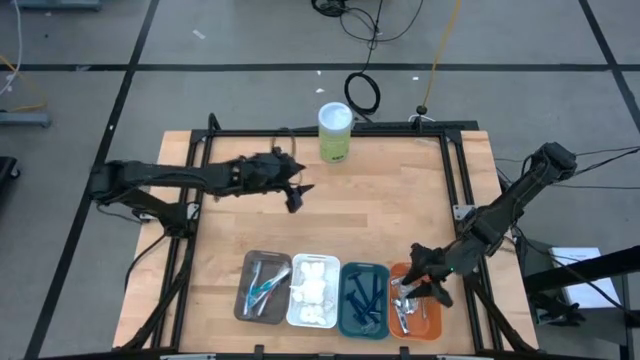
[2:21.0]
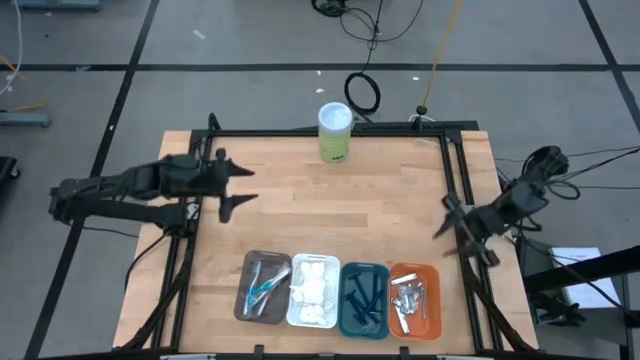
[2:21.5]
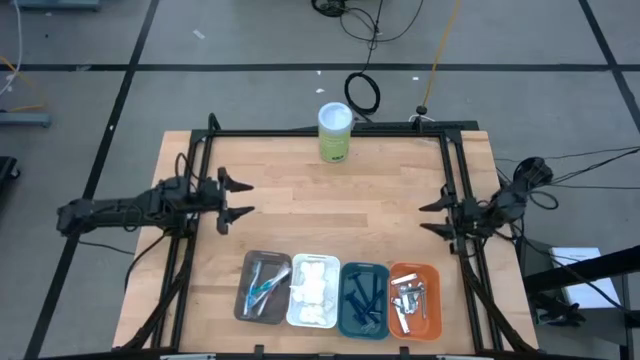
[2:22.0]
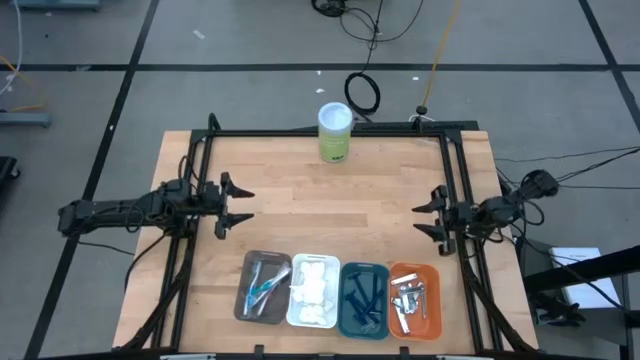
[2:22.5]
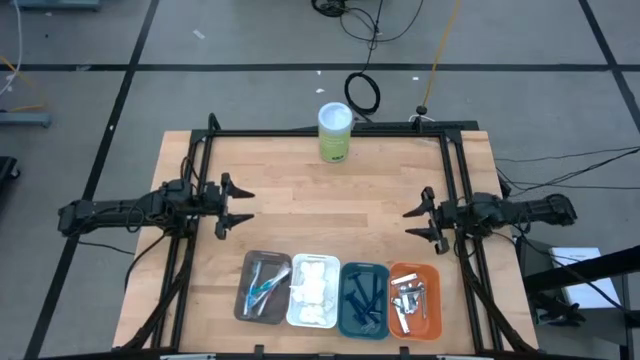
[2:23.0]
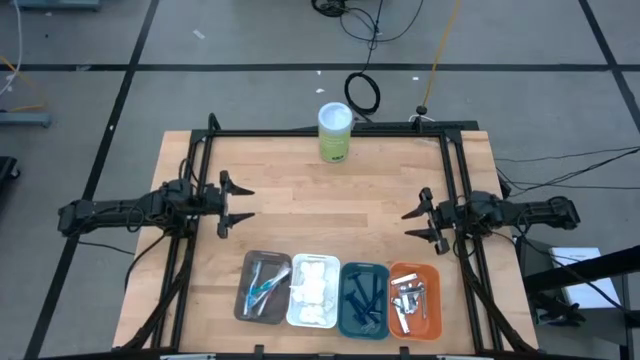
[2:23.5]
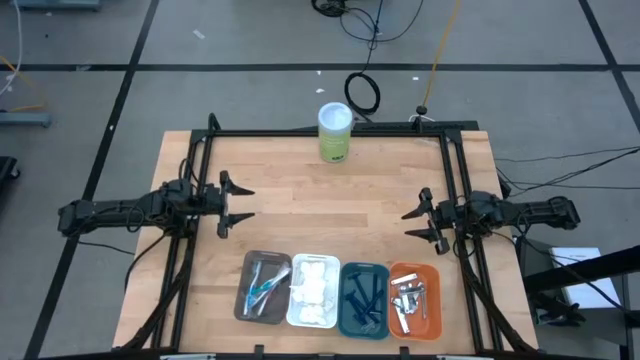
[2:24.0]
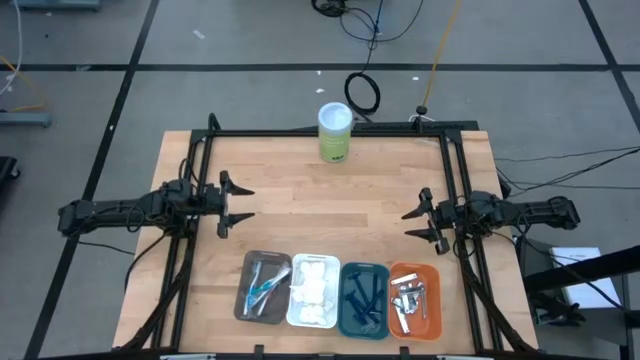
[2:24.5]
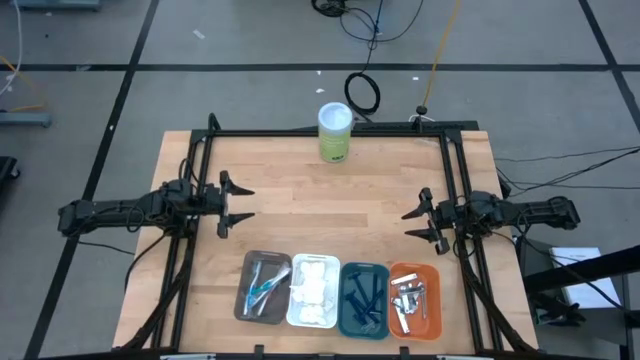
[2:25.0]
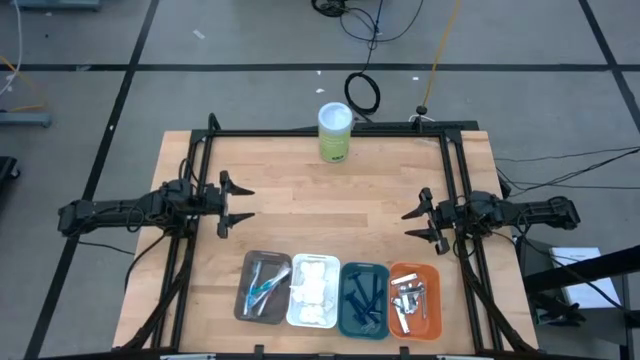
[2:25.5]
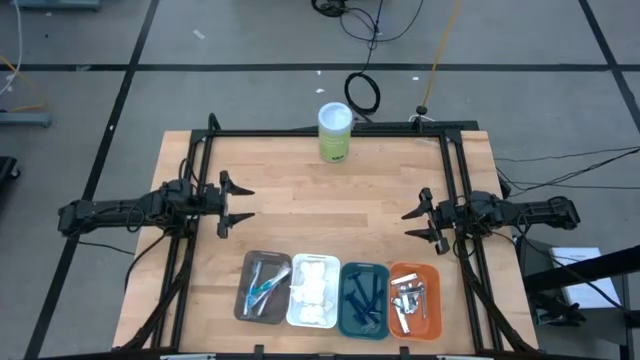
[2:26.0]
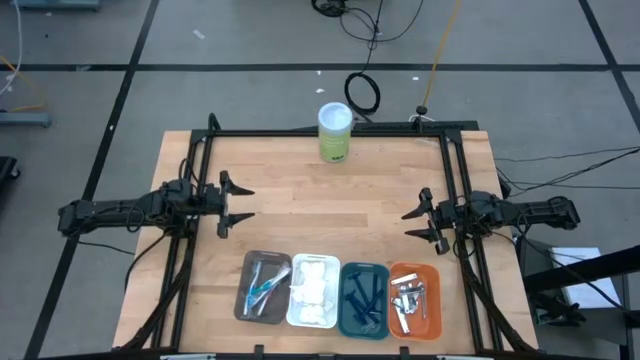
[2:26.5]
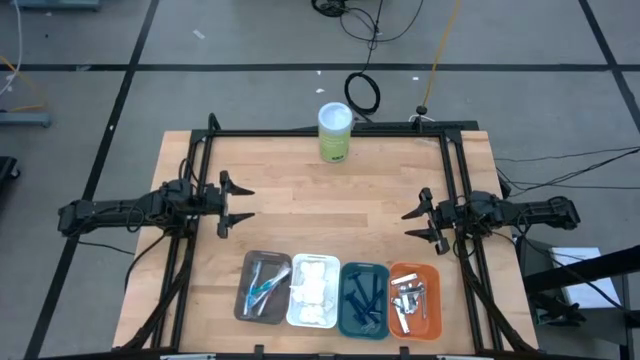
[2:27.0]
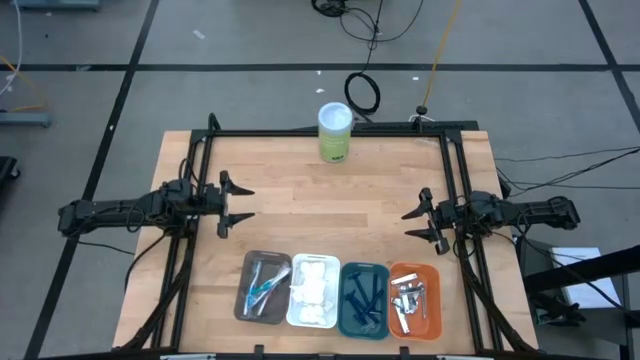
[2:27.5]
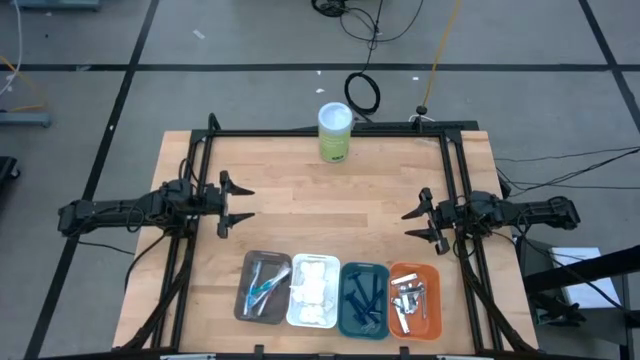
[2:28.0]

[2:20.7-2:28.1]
Task: Pick & Place Travel size toiletries
Return to Home Position

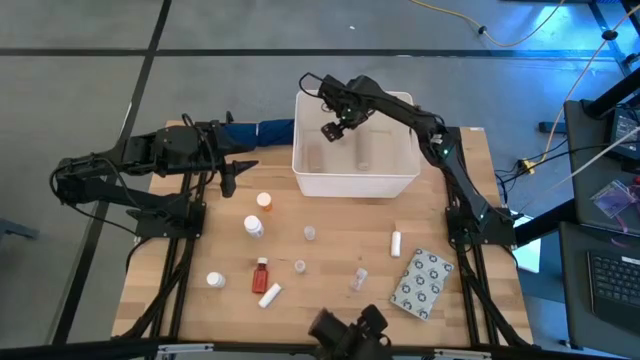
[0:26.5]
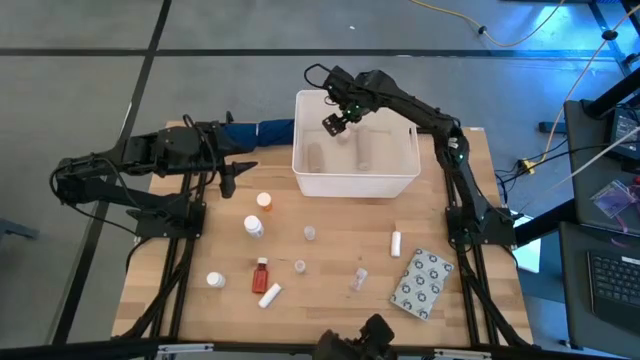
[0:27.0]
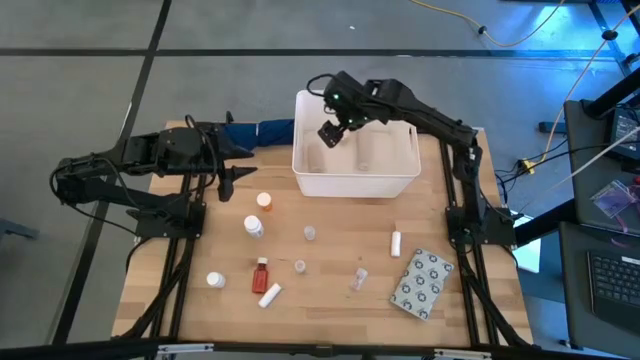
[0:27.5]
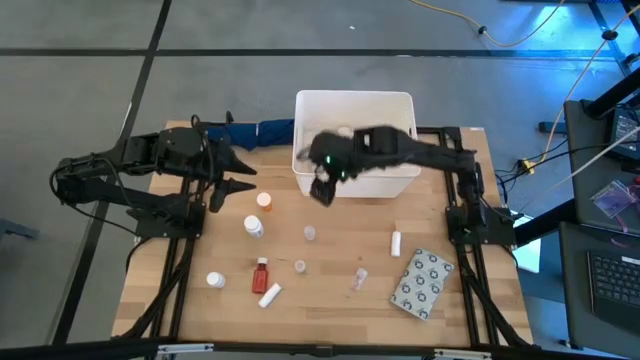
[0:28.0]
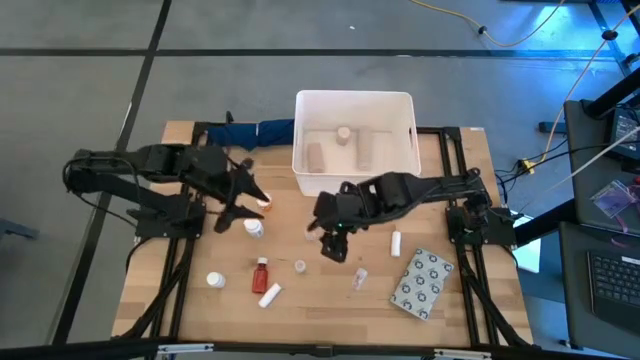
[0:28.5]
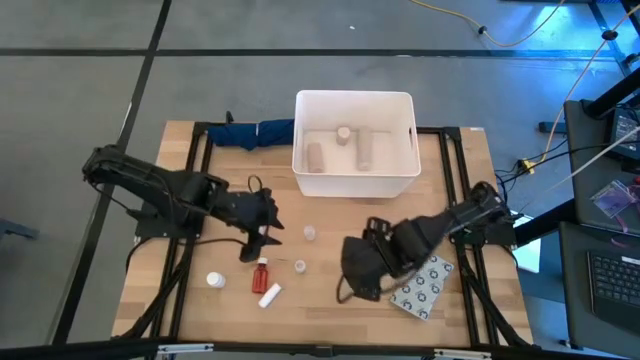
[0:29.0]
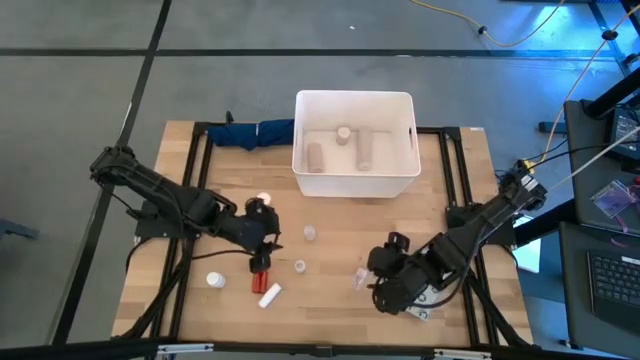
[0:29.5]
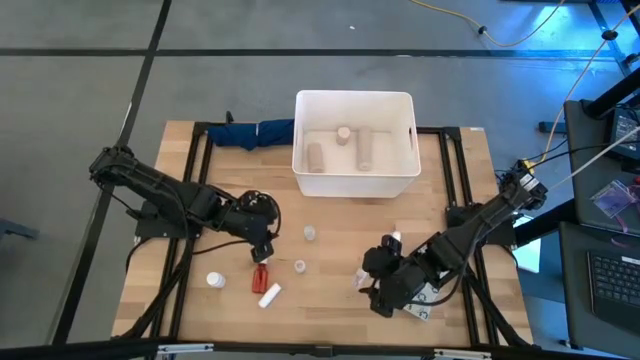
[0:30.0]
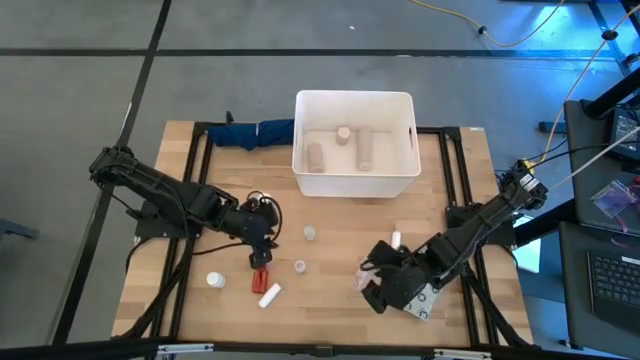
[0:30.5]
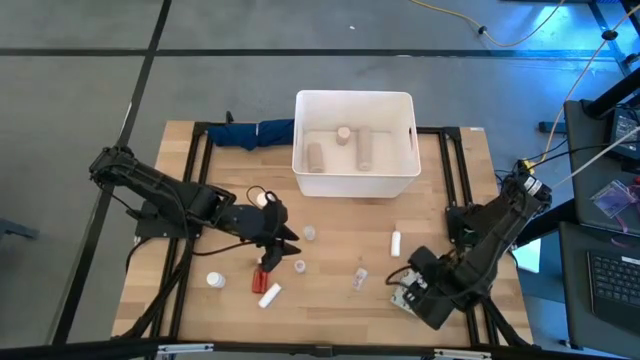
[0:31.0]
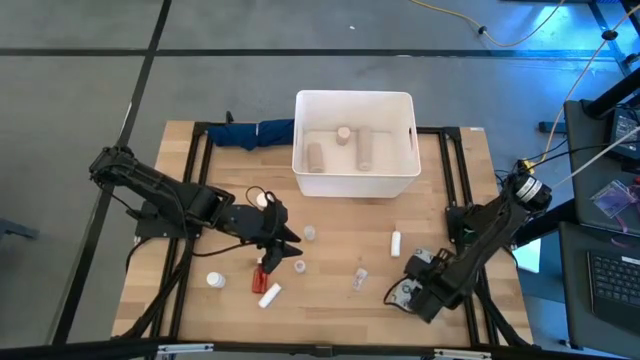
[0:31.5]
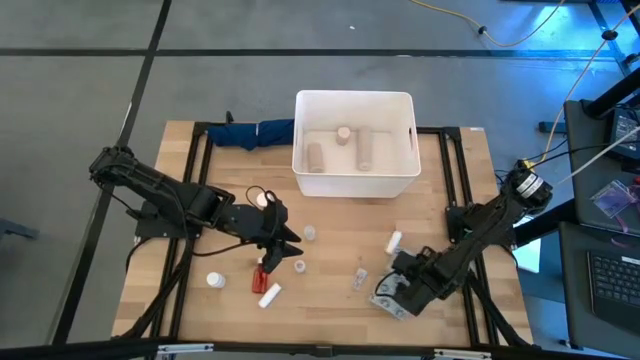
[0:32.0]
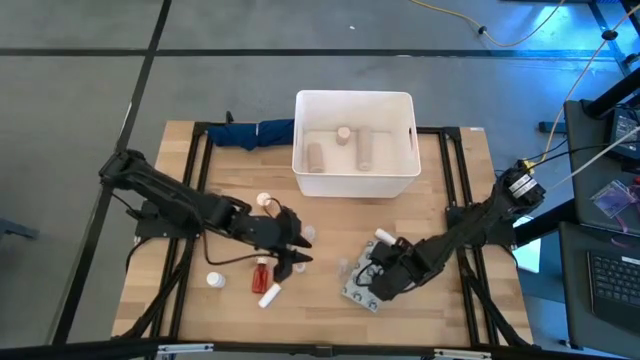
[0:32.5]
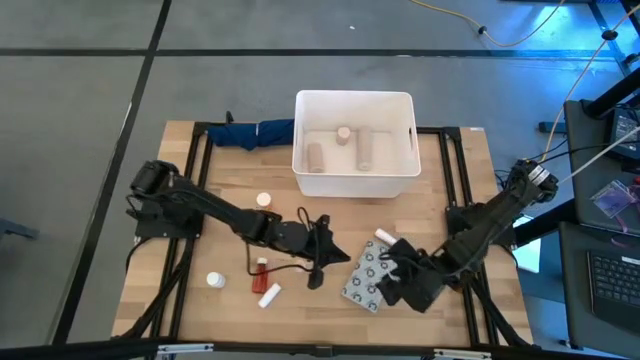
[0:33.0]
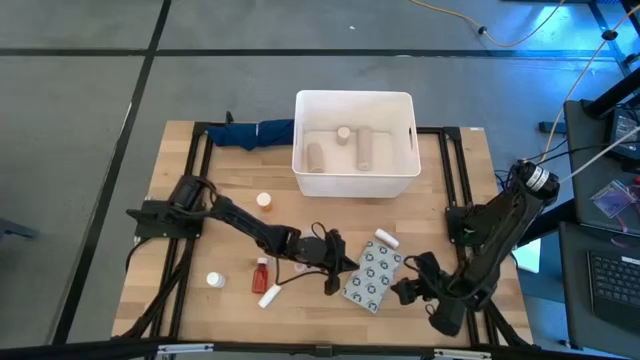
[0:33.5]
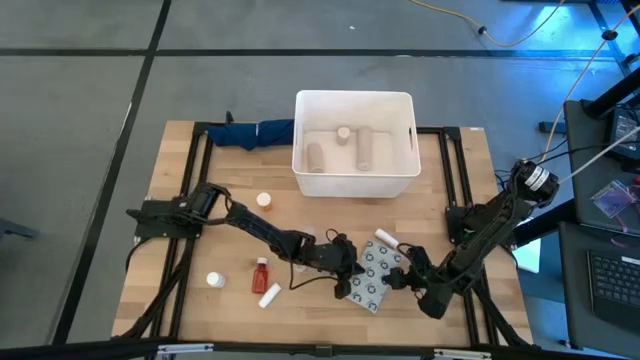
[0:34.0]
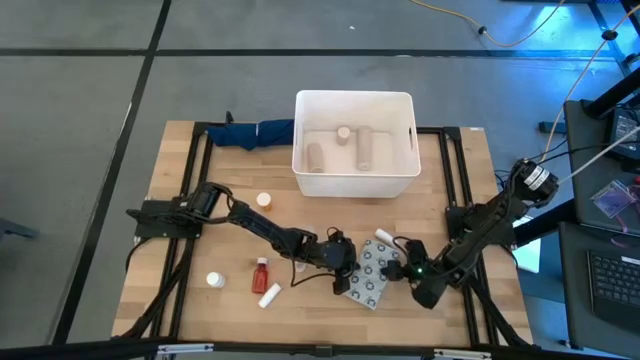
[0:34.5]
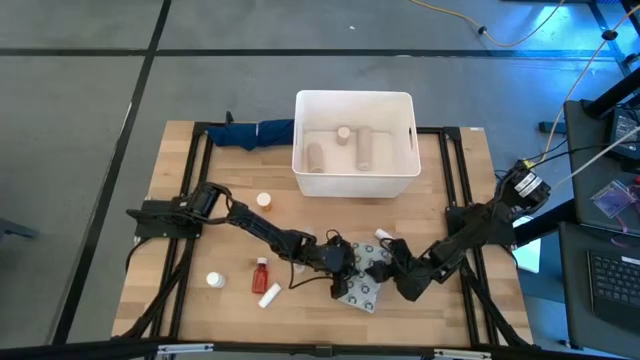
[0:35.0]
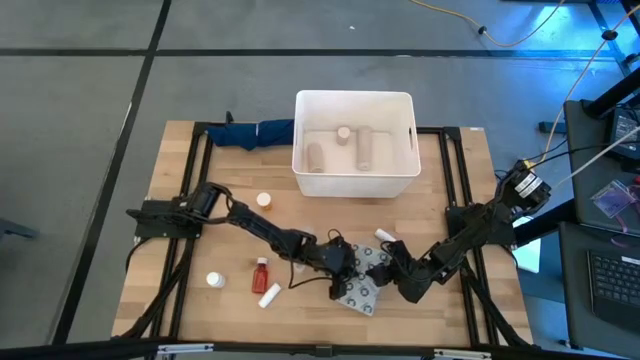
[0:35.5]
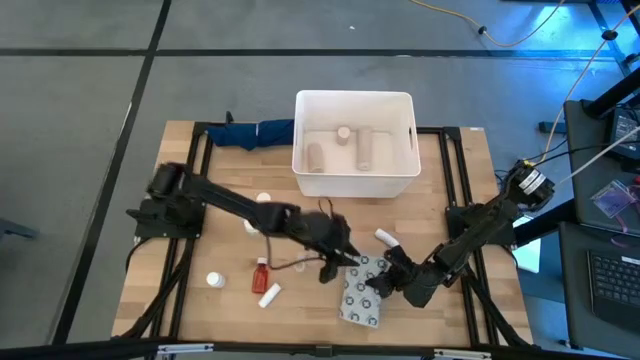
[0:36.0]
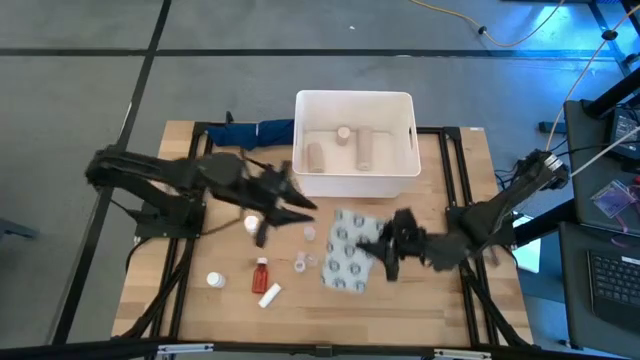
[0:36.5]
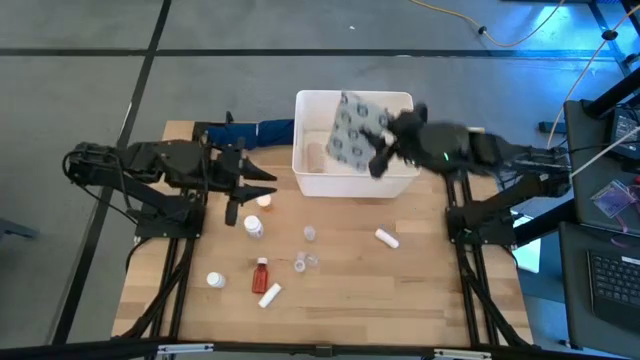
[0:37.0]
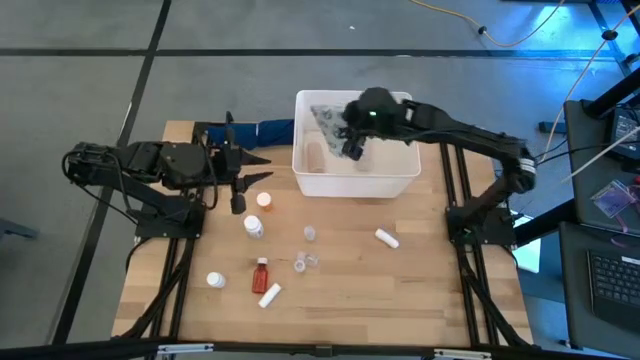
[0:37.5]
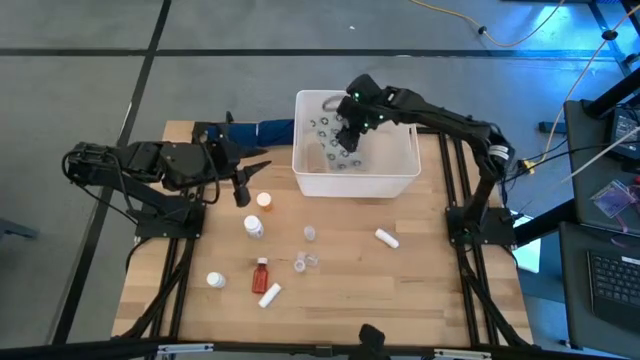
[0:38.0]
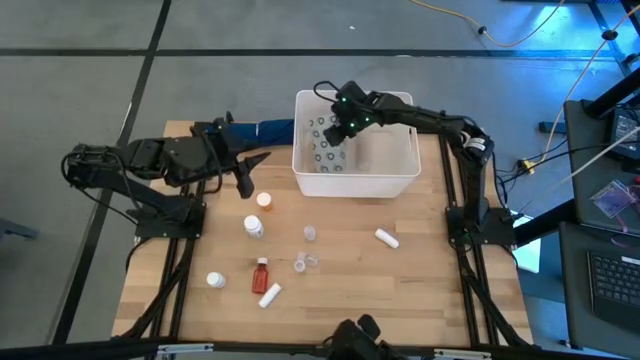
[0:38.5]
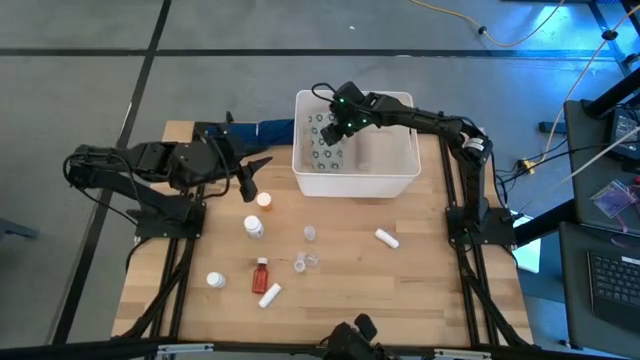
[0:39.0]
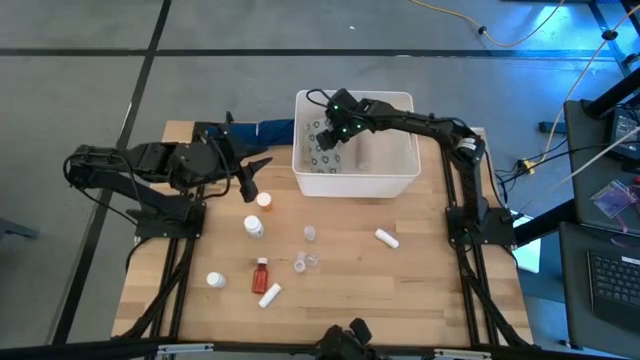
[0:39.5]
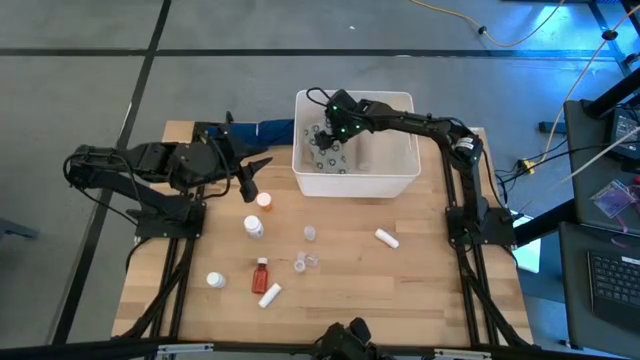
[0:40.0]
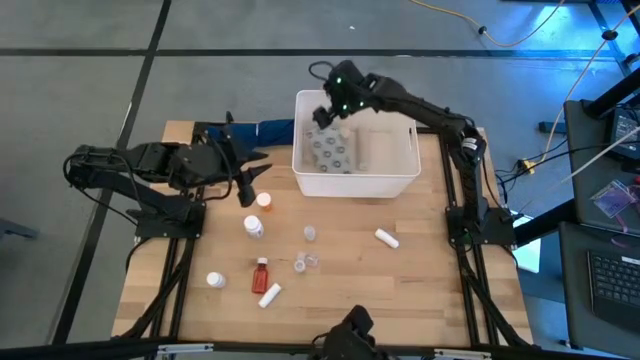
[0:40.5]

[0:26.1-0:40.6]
Task: Pick & place medical supplies in basket/bin
Put the white mailer bag into the white bin
